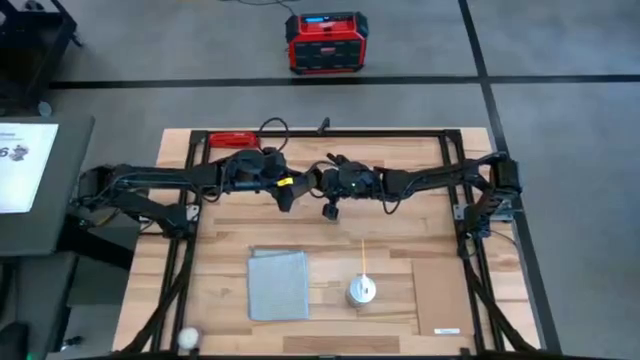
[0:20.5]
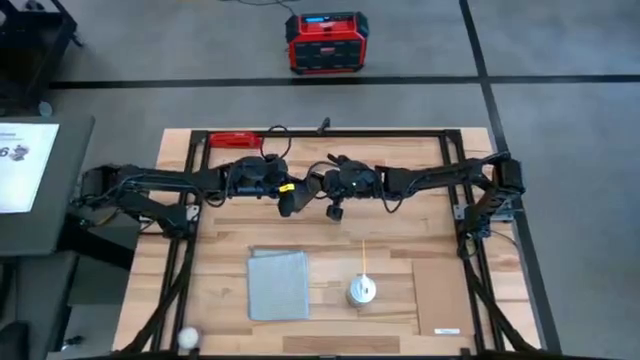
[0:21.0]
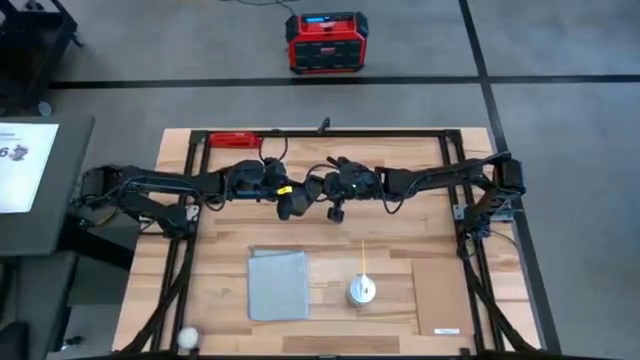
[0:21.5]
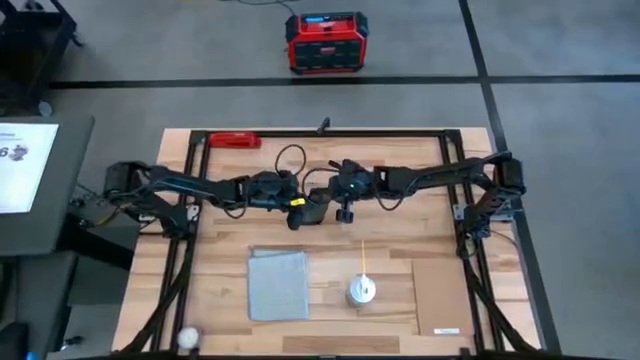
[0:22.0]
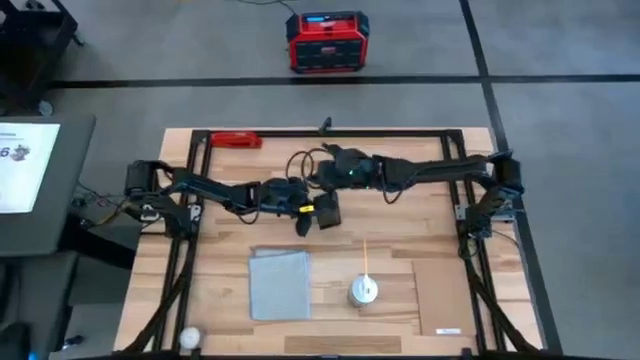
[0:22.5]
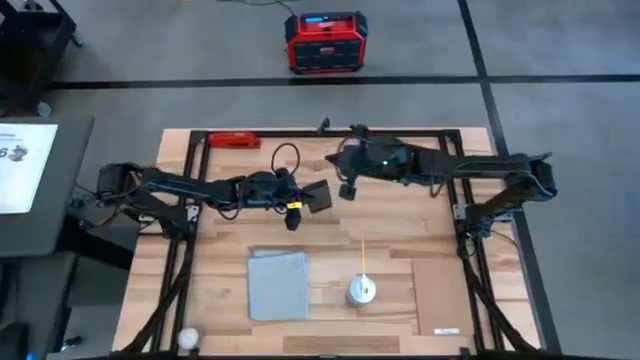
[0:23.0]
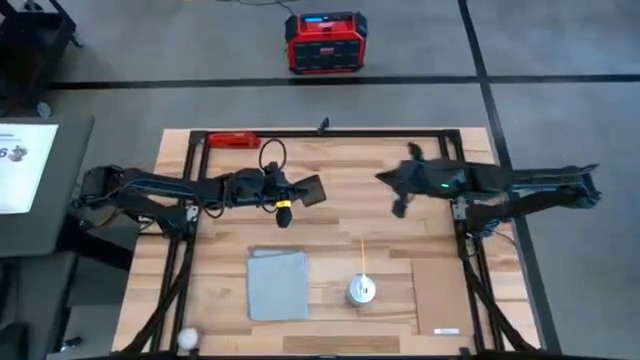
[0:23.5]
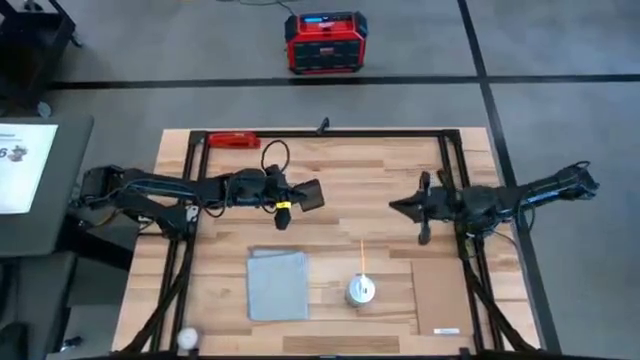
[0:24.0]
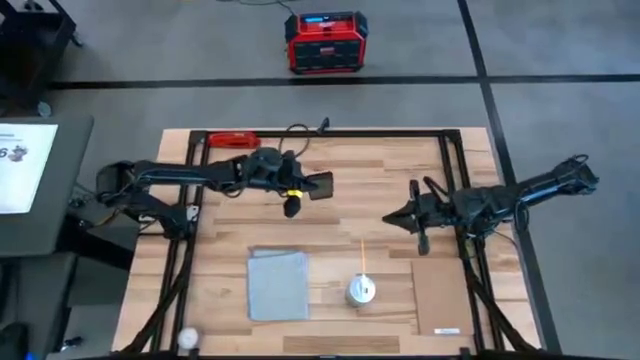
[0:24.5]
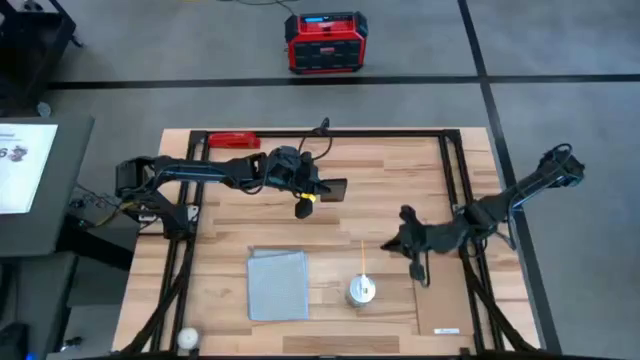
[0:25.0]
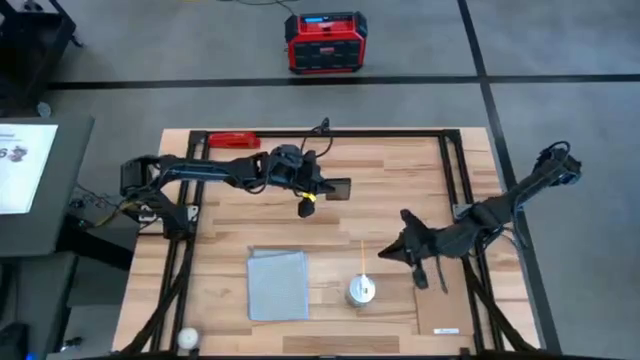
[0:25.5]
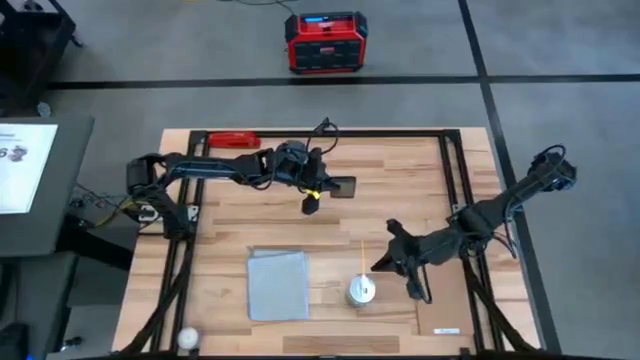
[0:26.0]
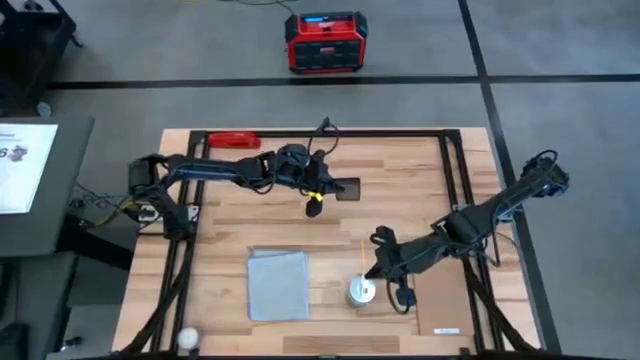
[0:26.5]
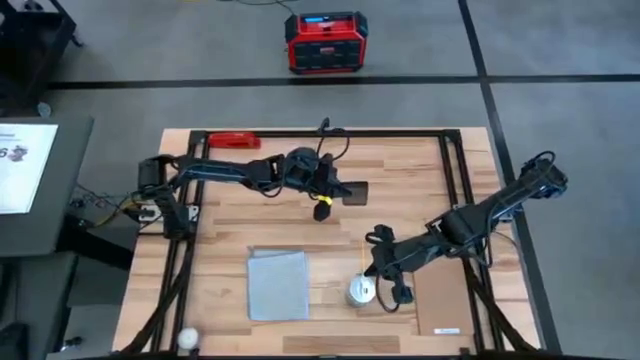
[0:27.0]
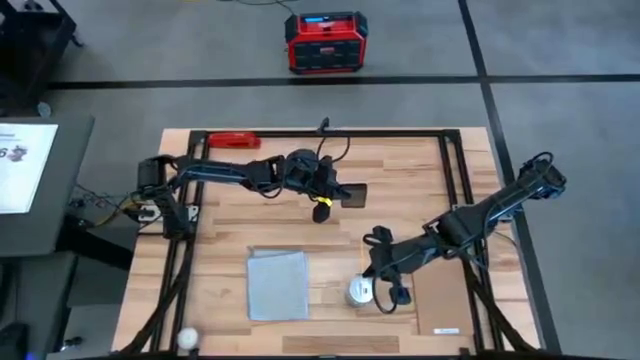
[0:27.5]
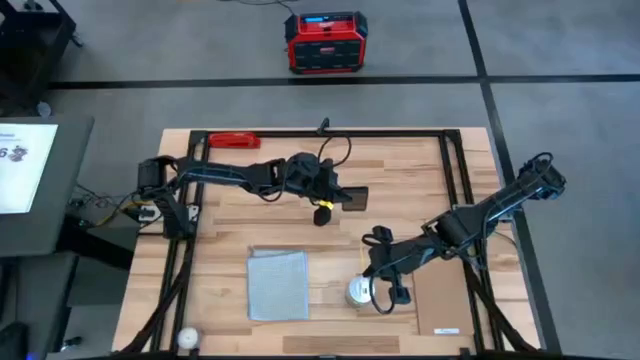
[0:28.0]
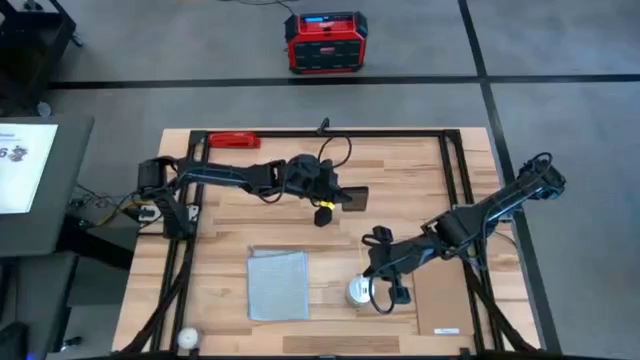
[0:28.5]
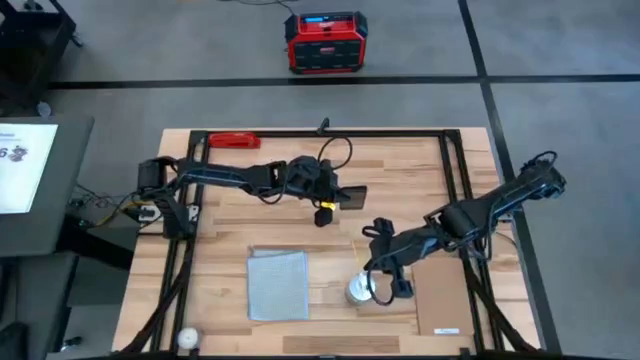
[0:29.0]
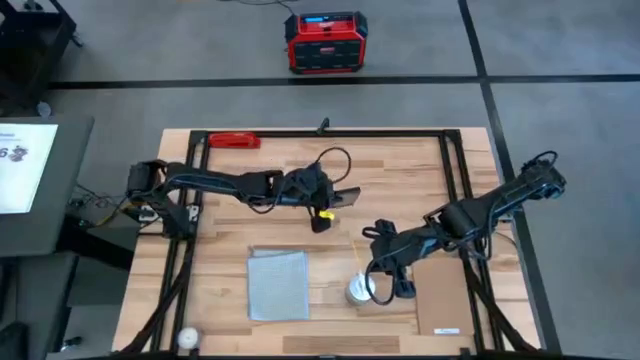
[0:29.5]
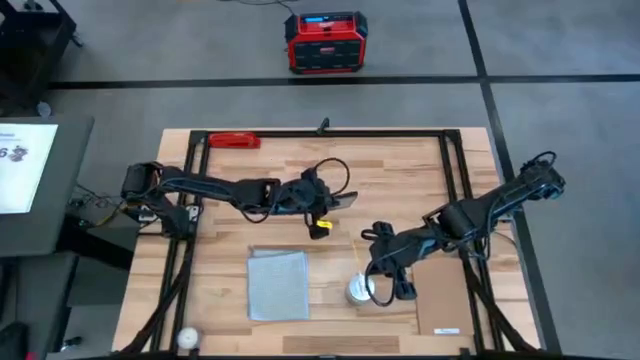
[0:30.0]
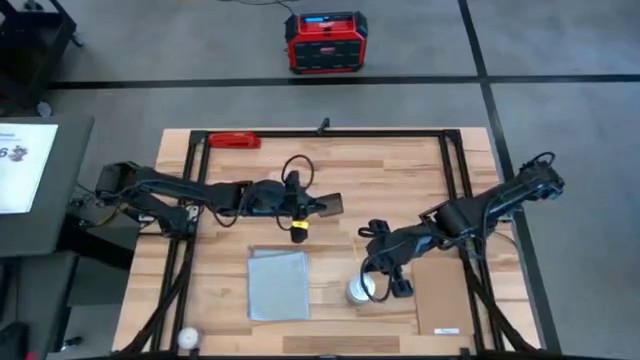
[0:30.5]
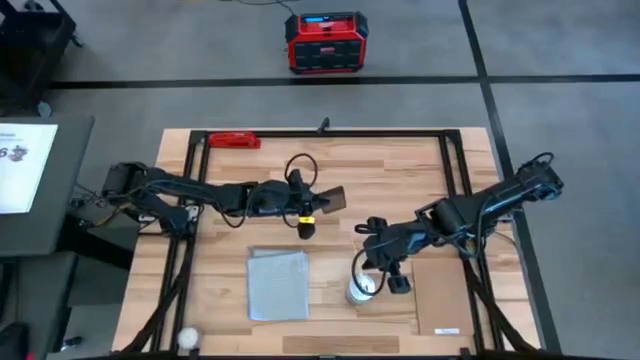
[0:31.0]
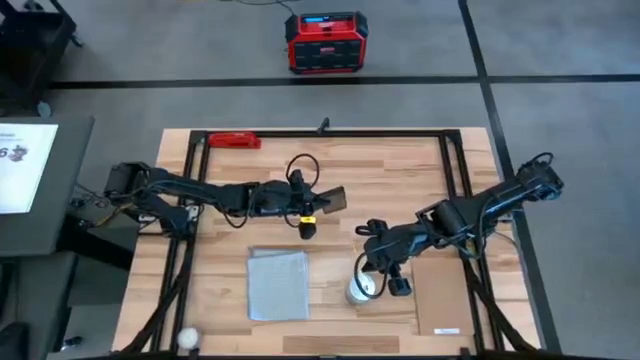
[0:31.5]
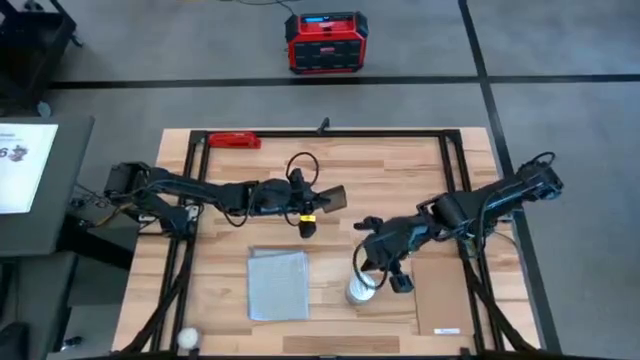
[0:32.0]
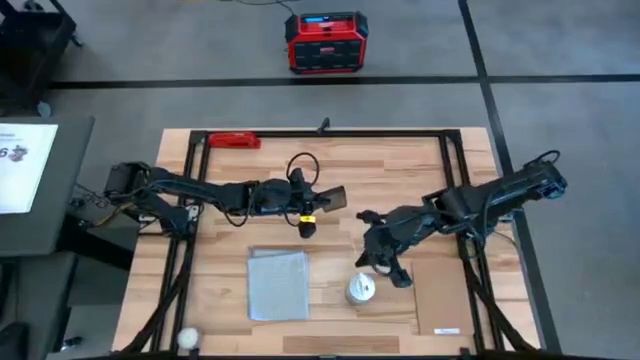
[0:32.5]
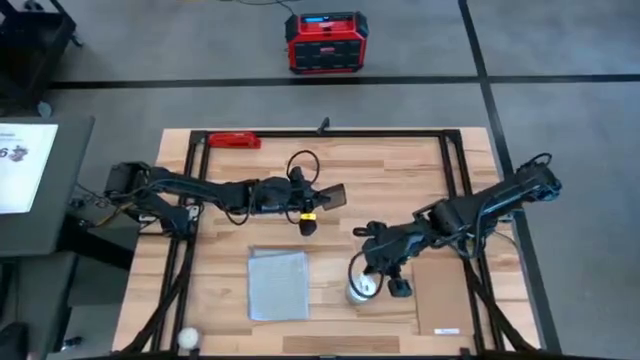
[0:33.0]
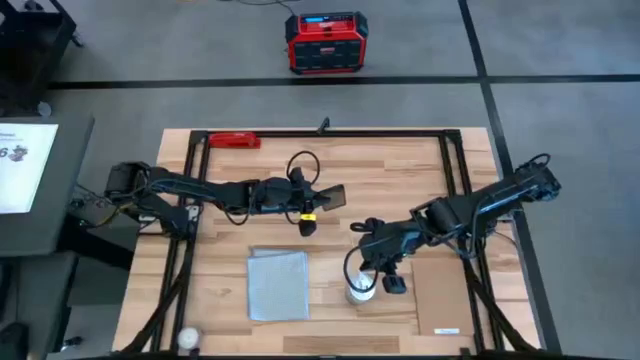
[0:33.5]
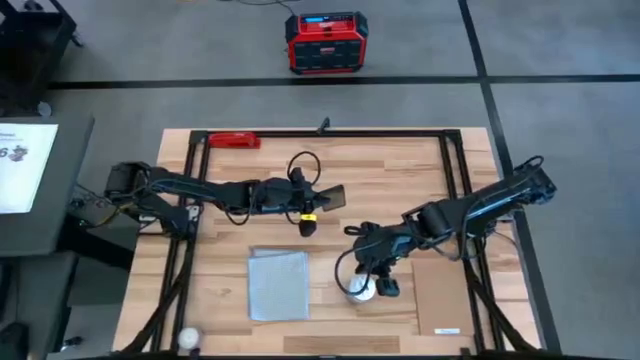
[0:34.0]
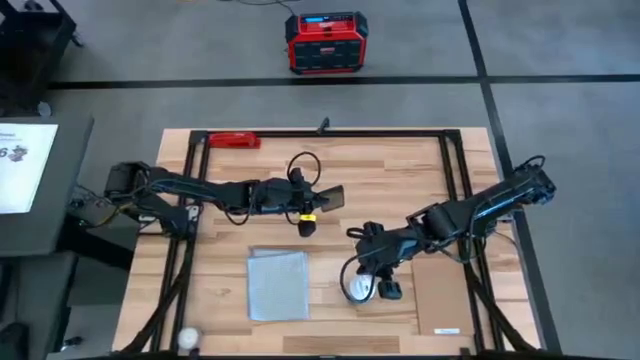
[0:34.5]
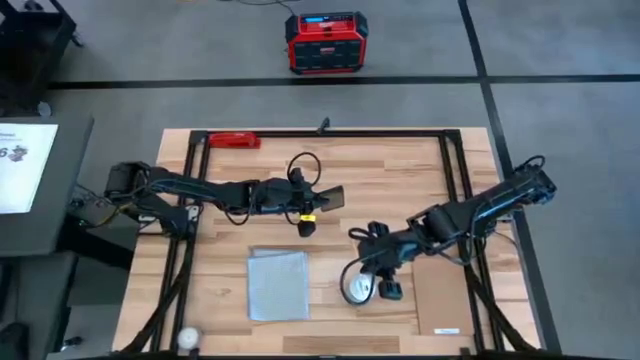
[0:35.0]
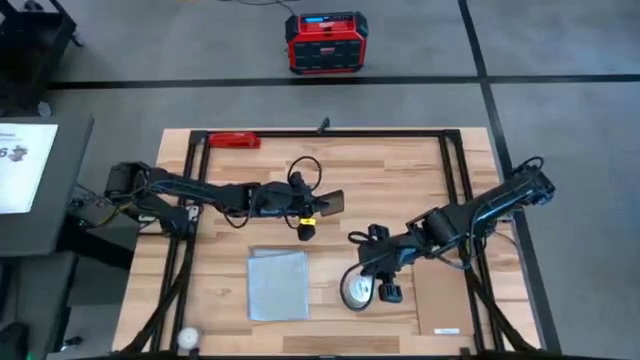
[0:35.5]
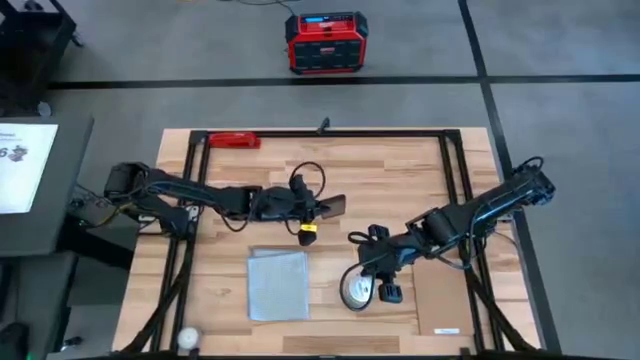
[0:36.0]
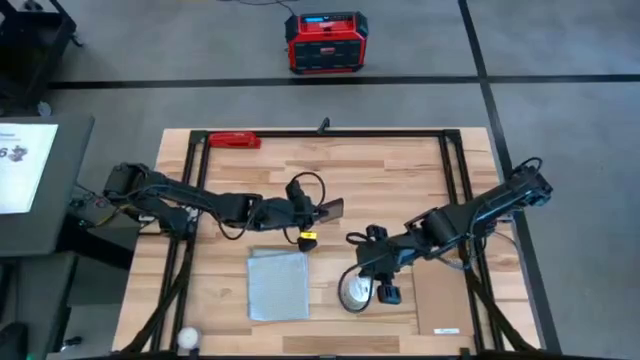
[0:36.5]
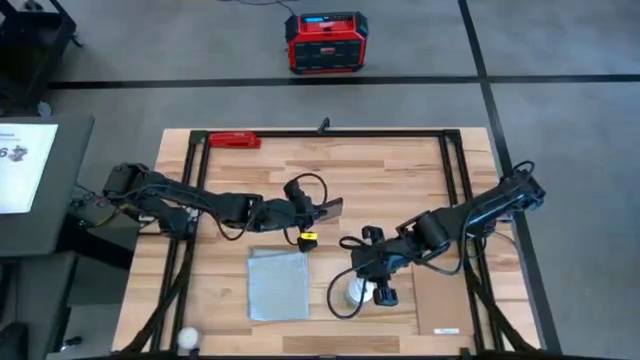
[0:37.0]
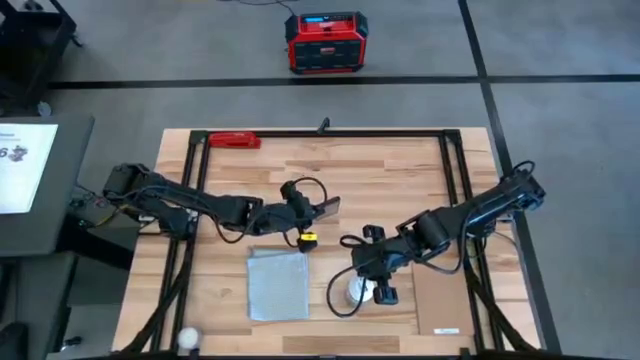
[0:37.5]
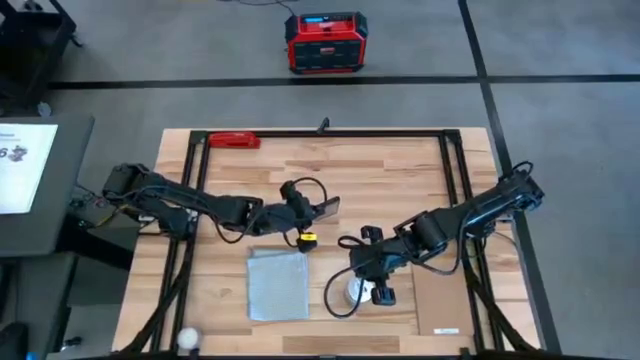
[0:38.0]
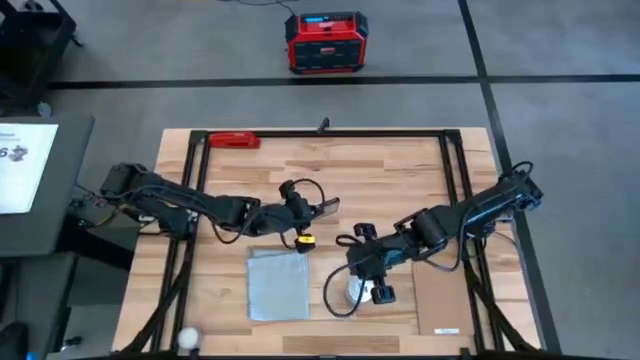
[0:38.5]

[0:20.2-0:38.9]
Task: Apply microfiber cloth
Spray the front of the black phone with the spray bottle

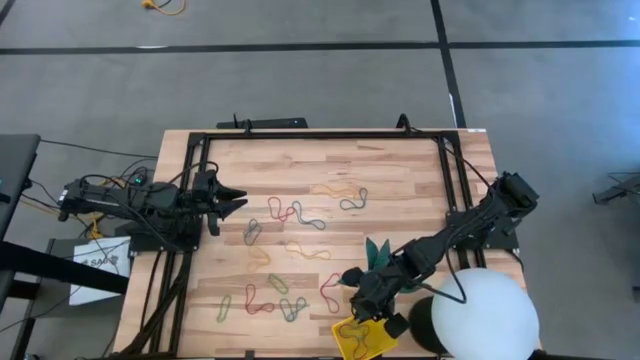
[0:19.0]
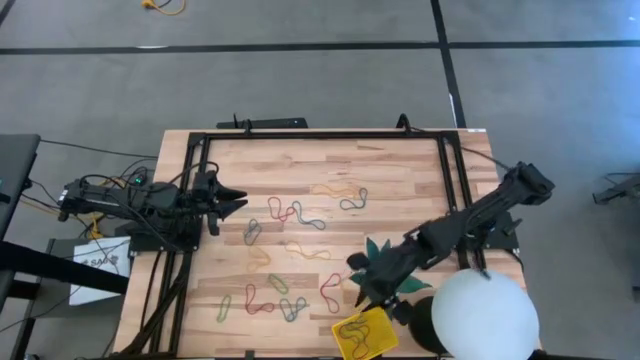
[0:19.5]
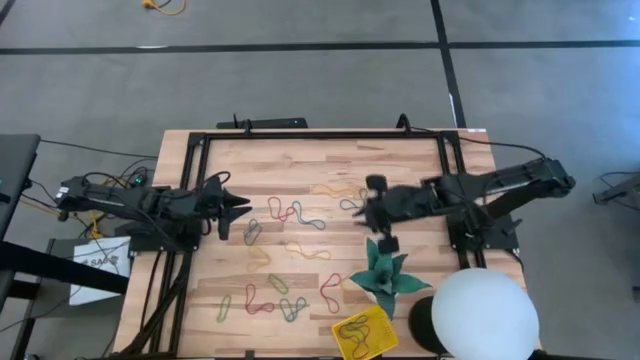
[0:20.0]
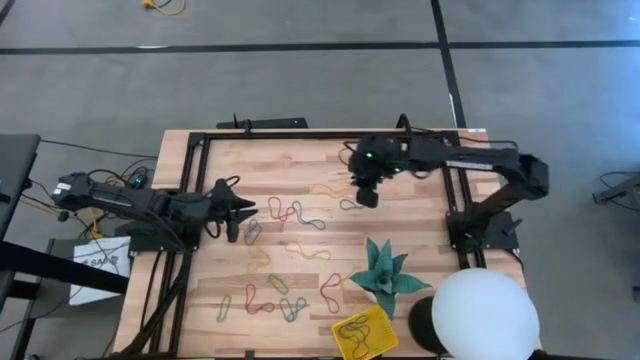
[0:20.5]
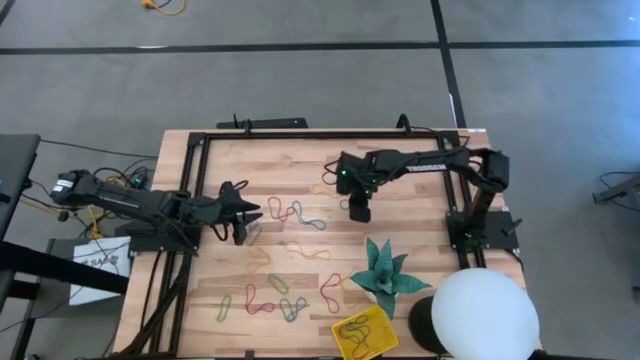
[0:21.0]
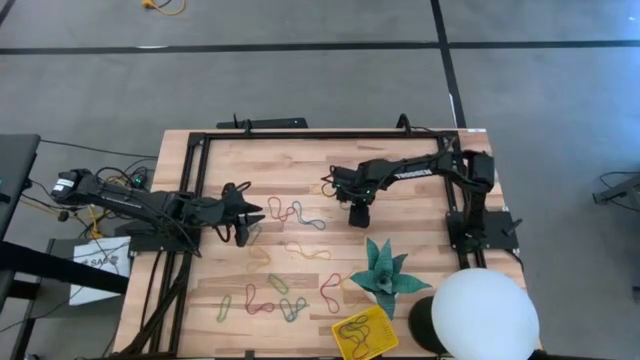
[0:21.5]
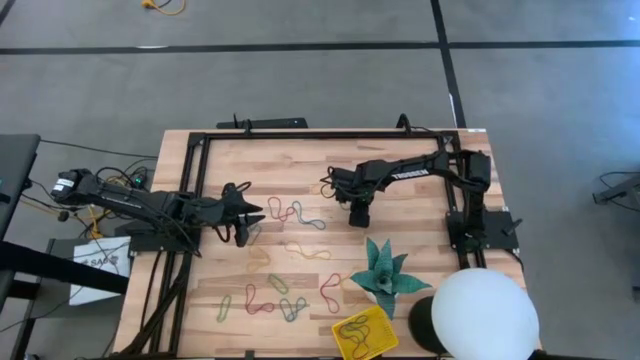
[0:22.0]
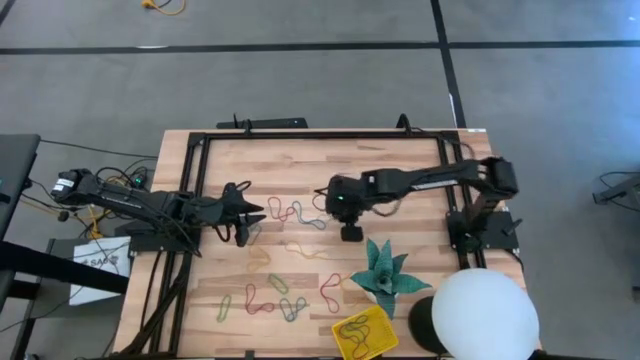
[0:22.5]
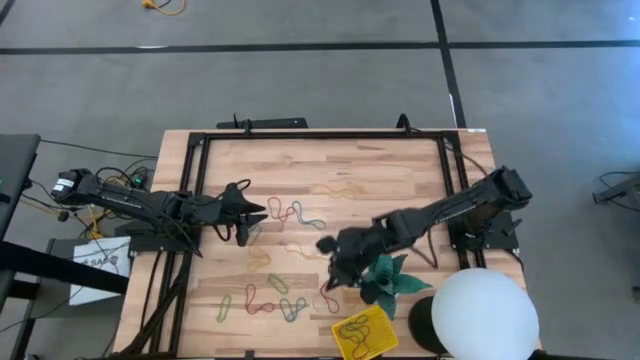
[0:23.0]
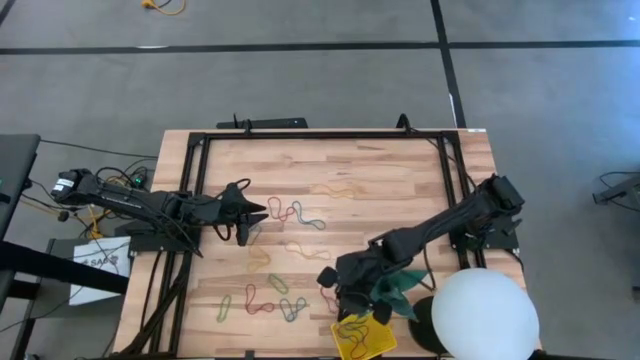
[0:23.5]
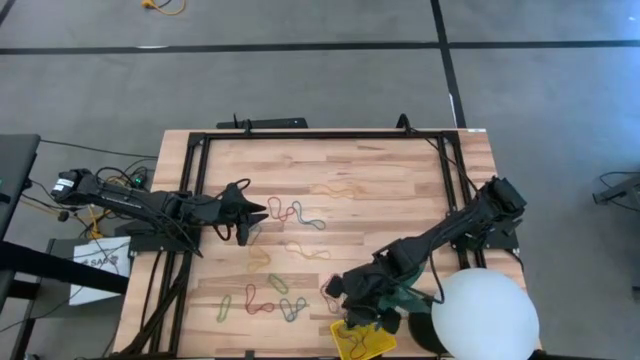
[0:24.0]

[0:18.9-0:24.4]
Task: Pick and place items into bin
Put the blue rubber band into the yellow bin
